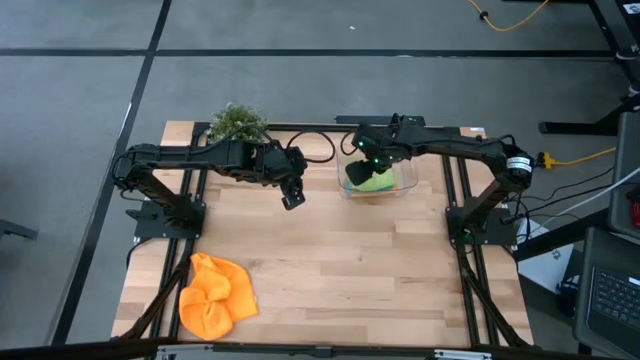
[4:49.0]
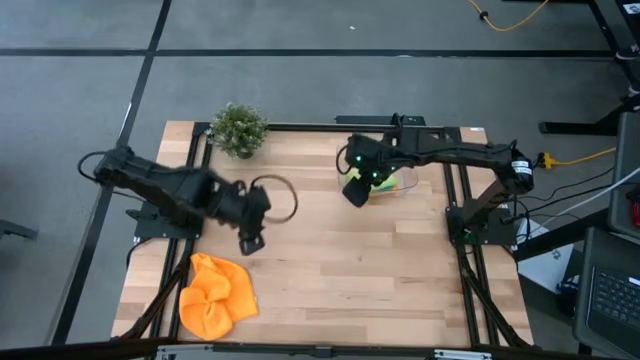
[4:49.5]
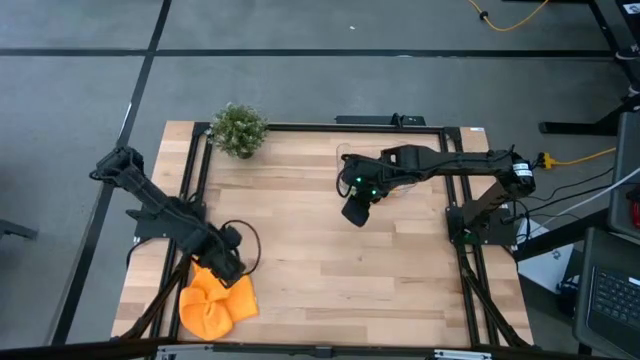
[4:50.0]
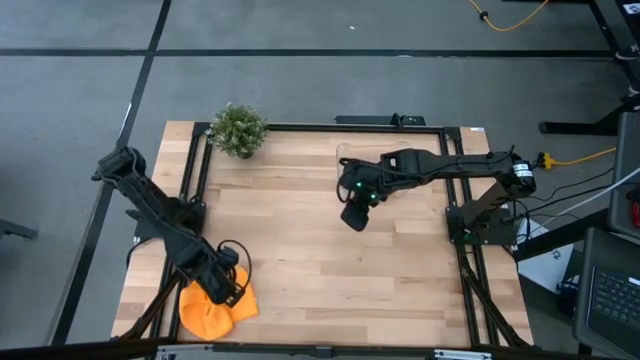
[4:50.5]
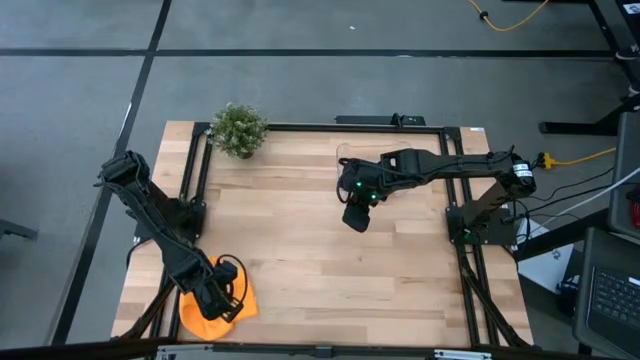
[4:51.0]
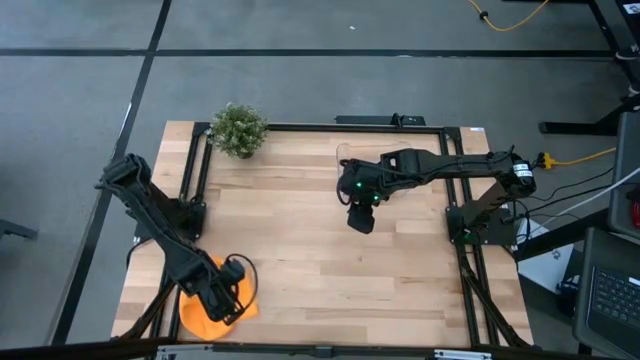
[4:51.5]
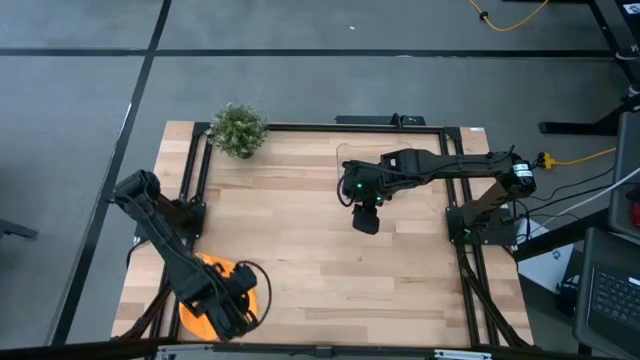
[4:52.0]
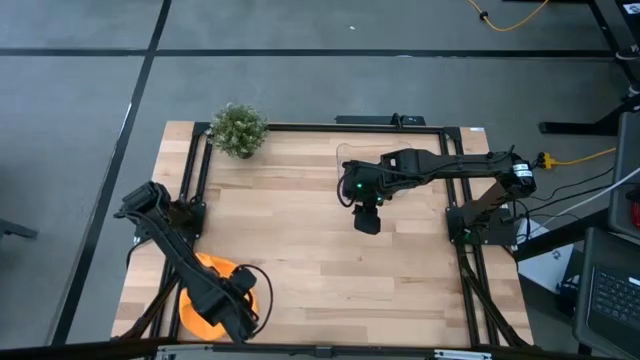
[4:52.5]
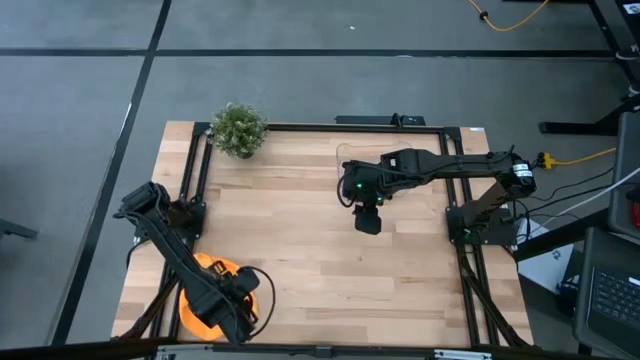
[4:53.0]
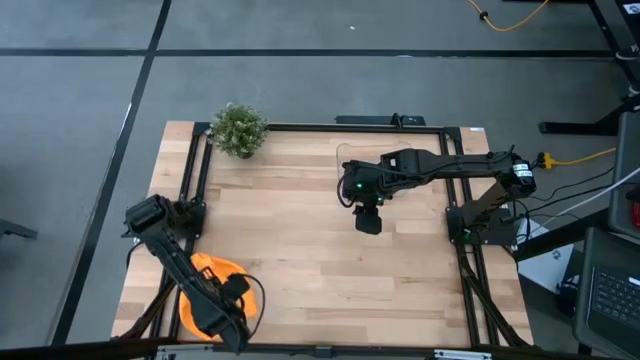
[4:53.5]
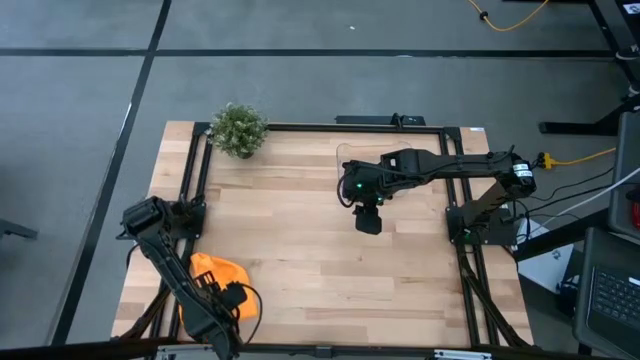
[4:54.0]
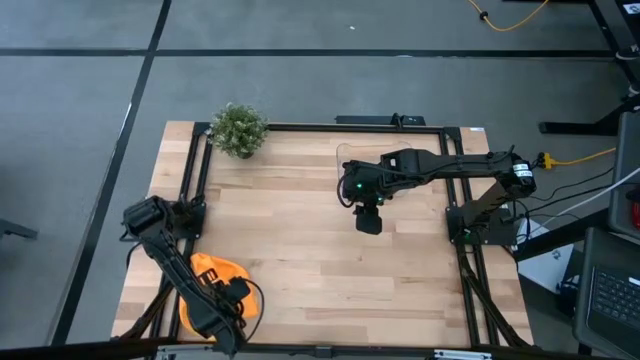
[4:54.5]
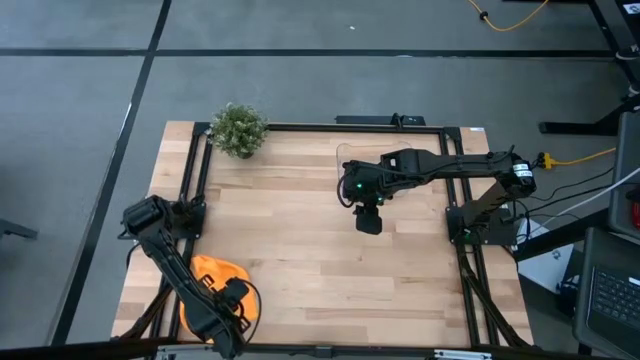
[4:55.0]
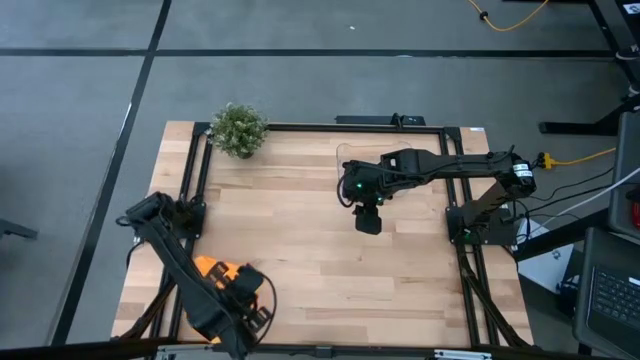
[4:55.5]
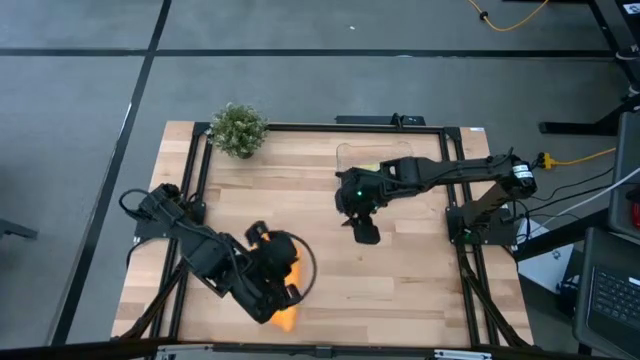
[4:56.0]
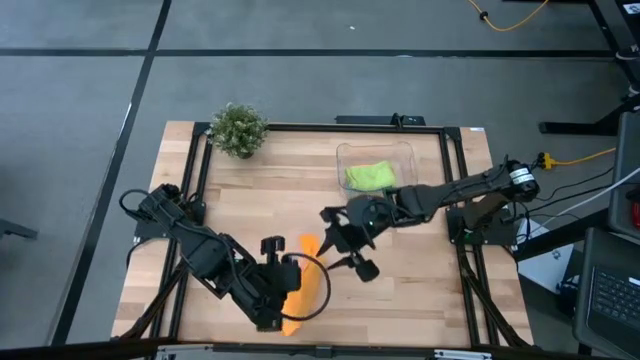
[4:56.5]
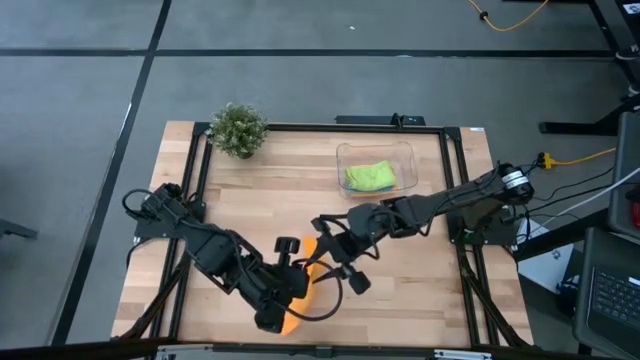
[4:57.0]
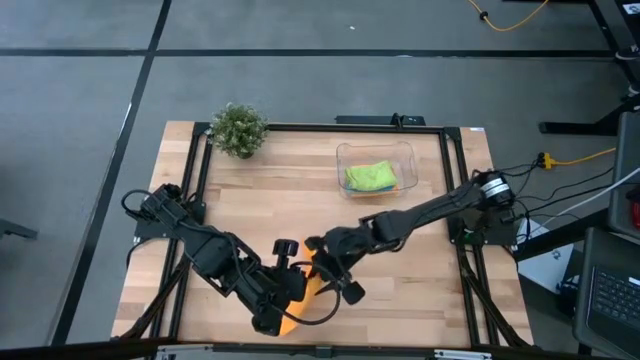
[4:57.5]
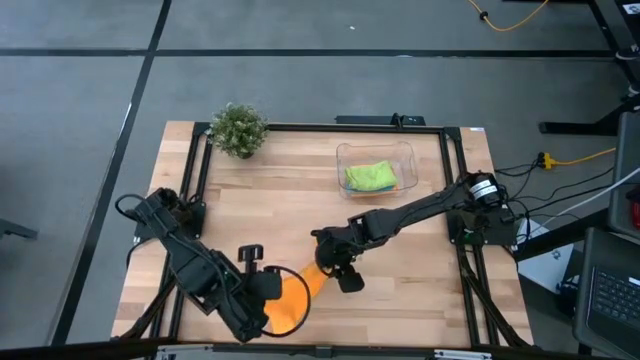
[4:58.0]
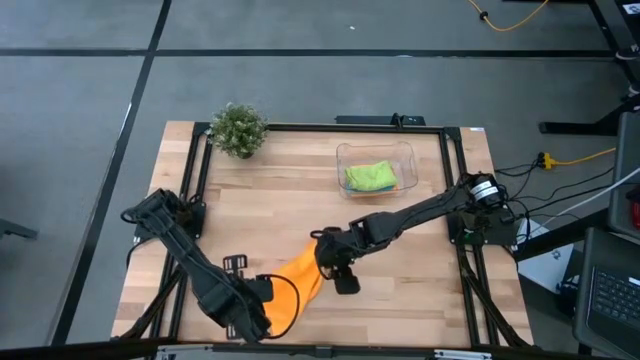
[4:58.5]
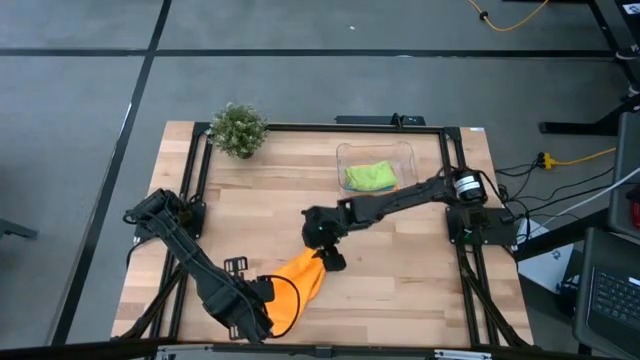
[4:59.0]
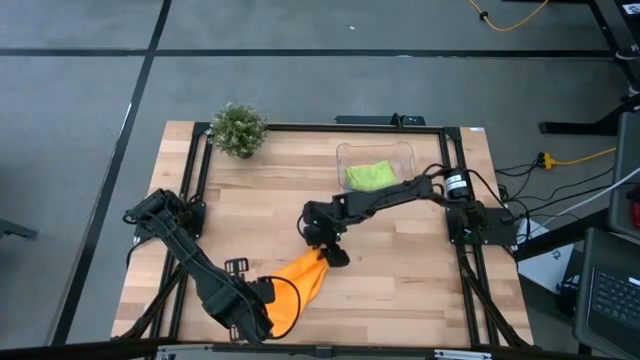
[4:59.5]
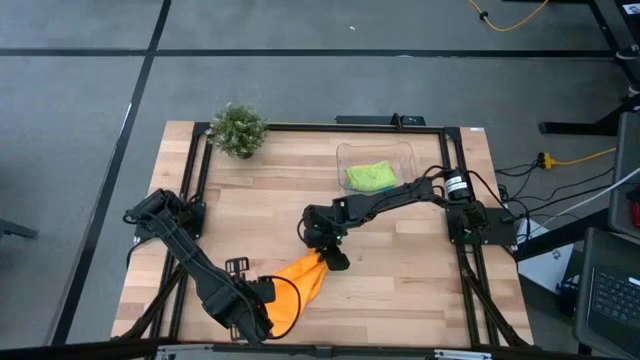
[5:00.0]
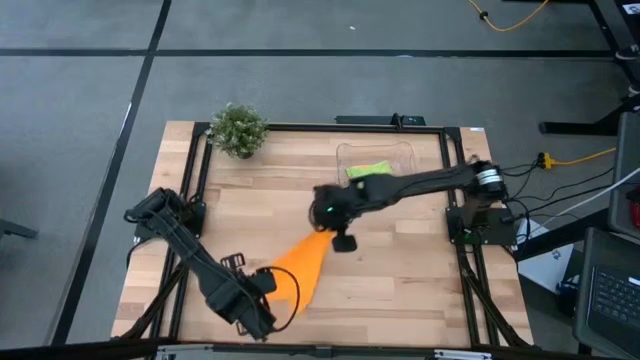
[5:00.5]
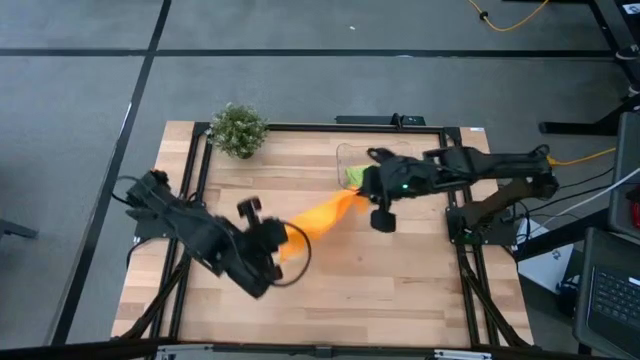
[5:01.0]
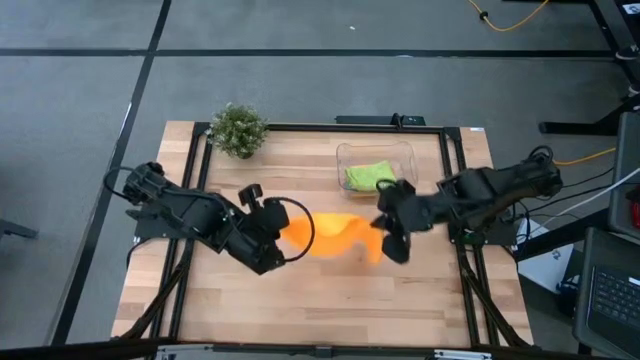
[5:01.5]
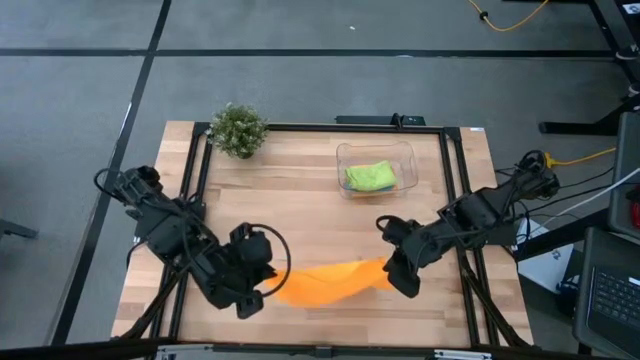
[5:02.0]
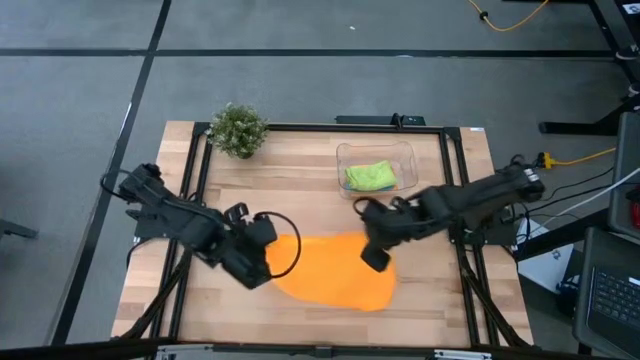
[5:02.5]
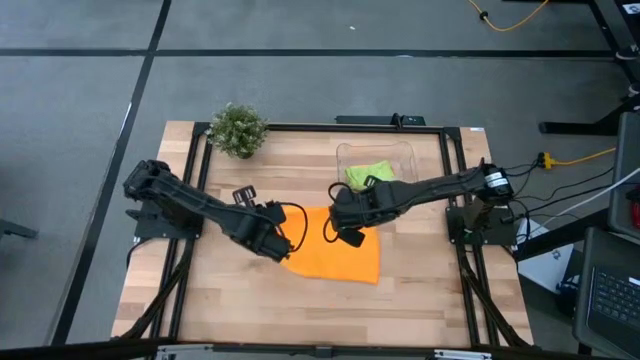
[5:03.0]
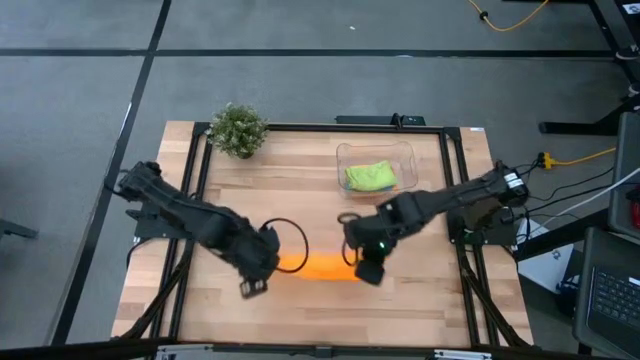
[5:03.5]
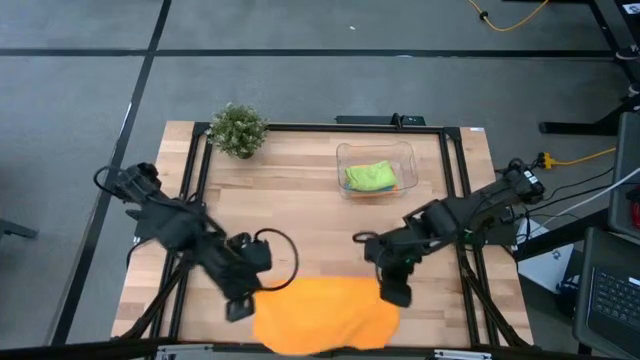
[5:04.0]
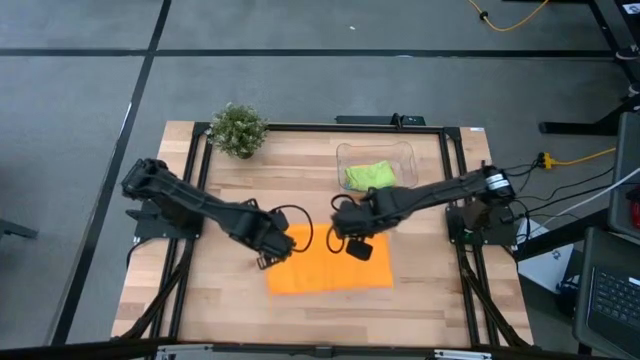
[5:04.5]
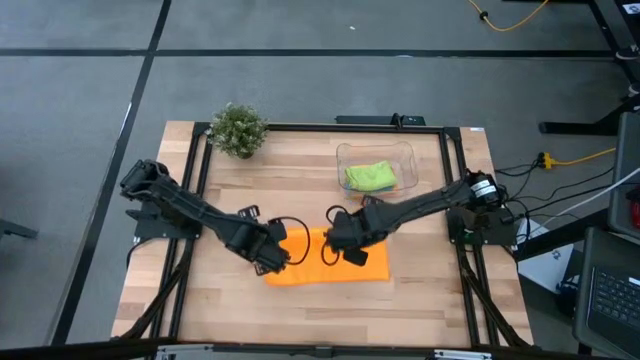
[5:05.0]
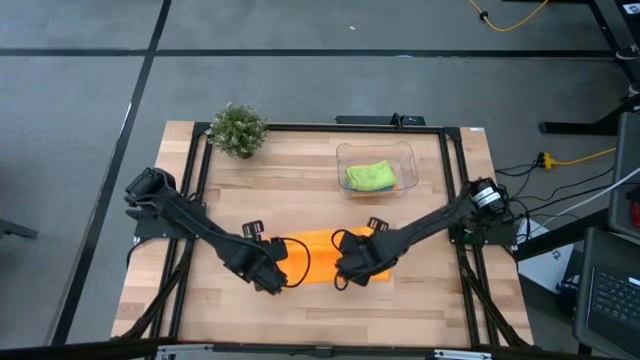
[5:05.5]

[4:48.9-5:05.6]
Task: Fold microfiber towels
Fold the orange microfiber cloth
